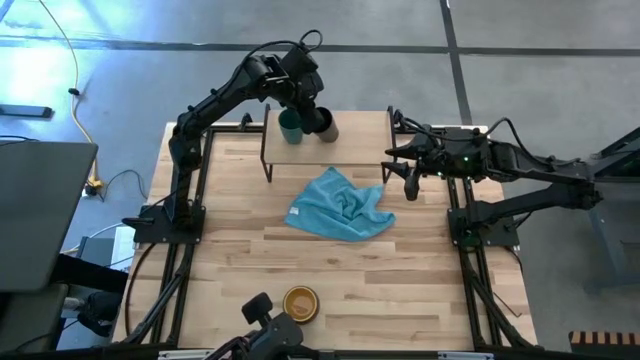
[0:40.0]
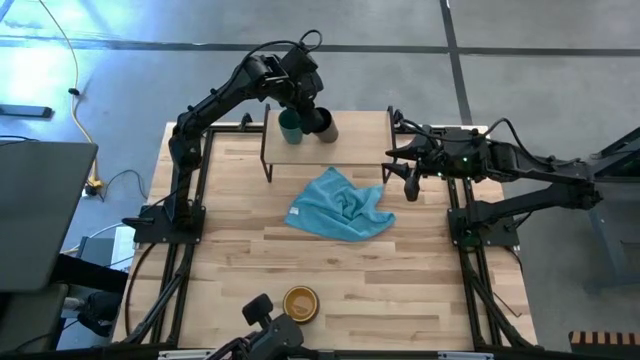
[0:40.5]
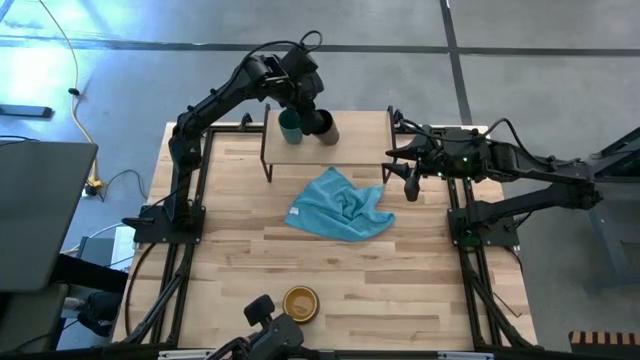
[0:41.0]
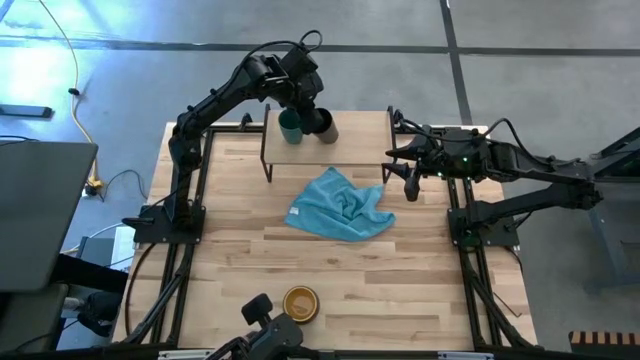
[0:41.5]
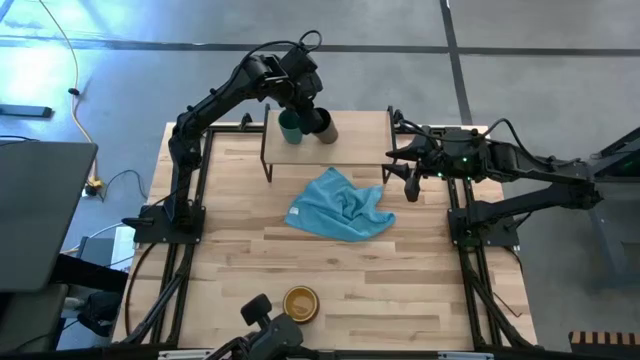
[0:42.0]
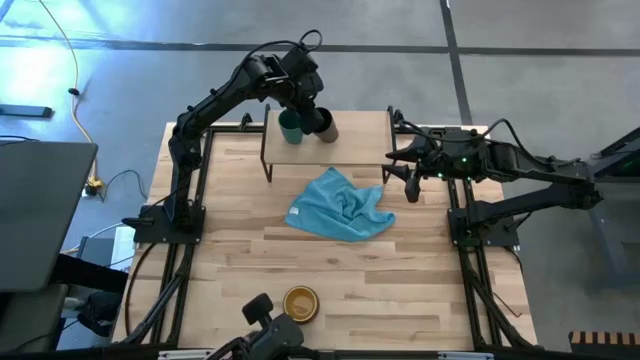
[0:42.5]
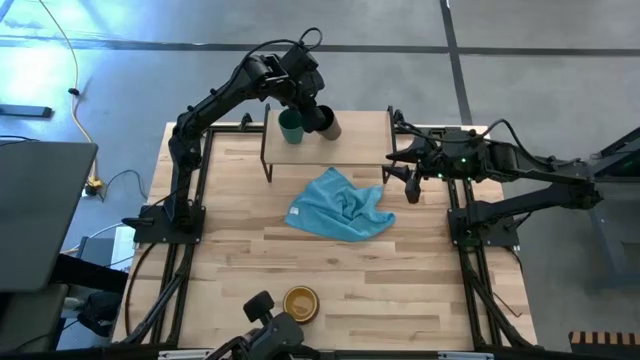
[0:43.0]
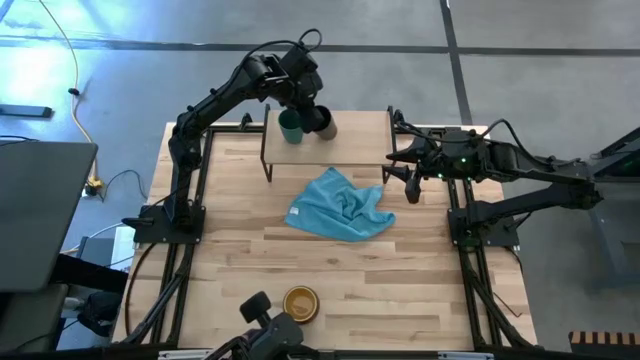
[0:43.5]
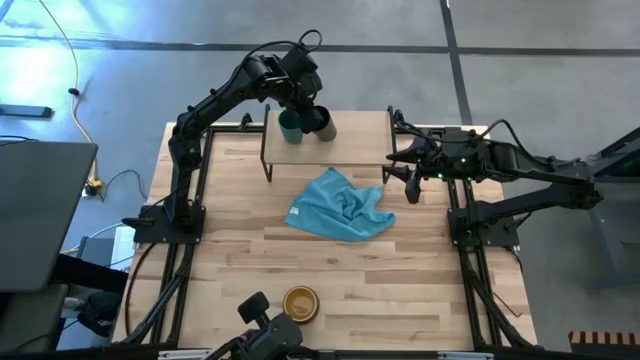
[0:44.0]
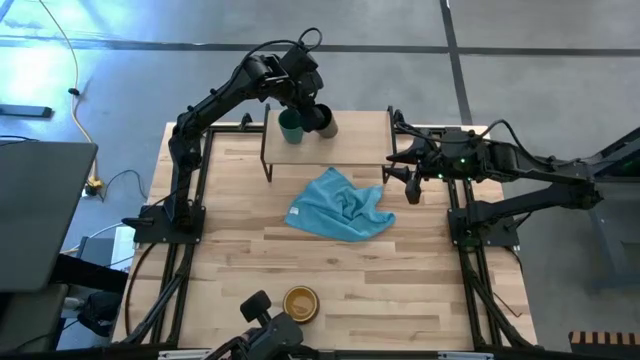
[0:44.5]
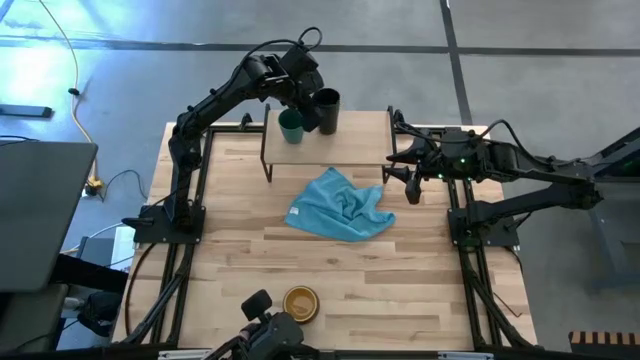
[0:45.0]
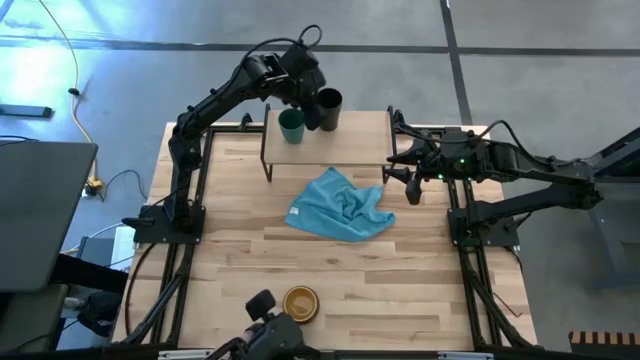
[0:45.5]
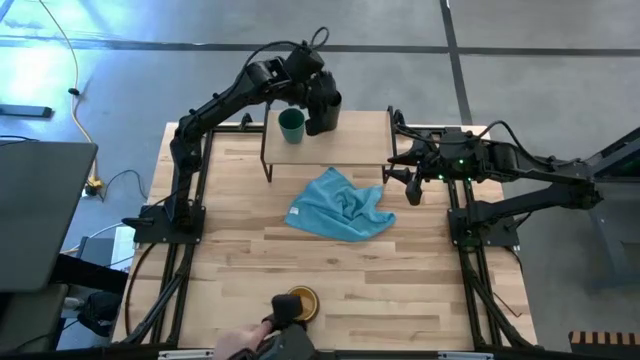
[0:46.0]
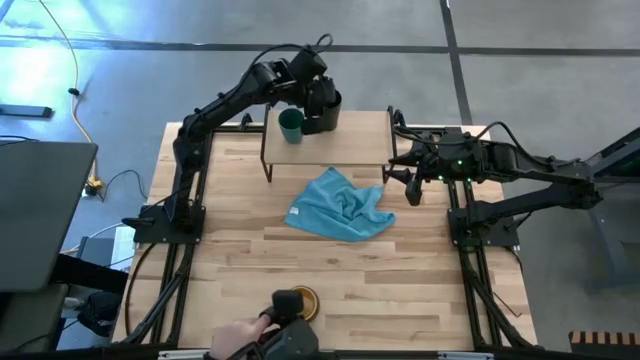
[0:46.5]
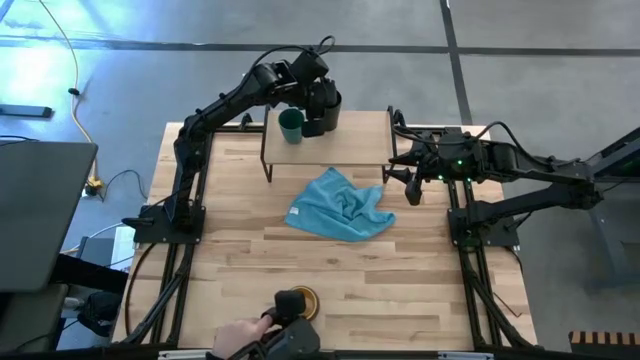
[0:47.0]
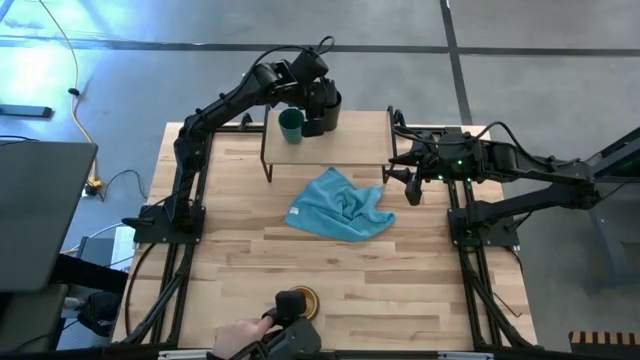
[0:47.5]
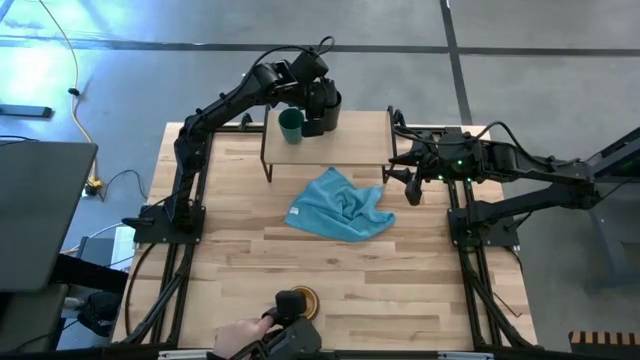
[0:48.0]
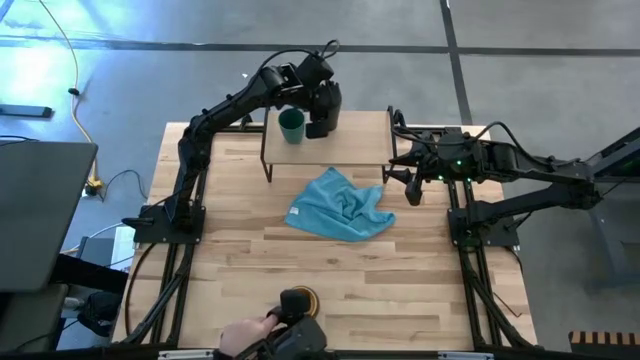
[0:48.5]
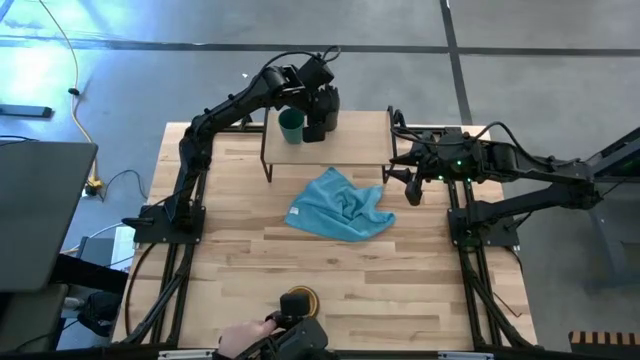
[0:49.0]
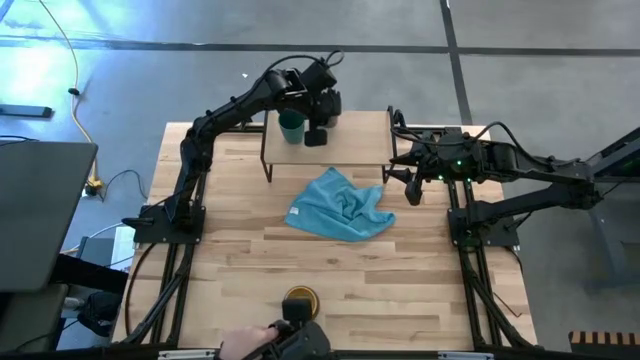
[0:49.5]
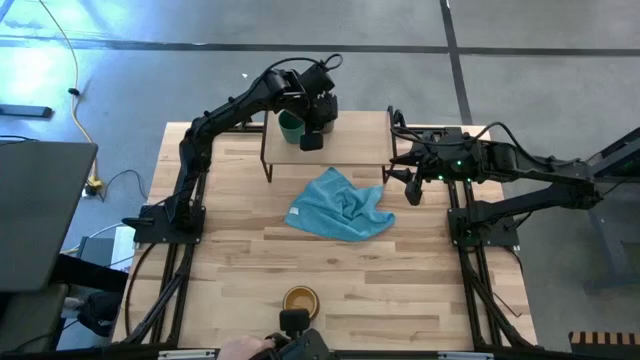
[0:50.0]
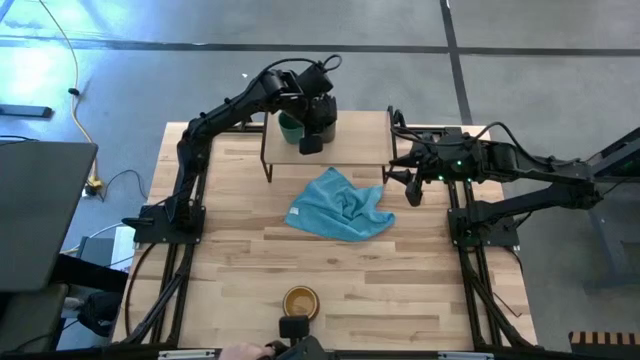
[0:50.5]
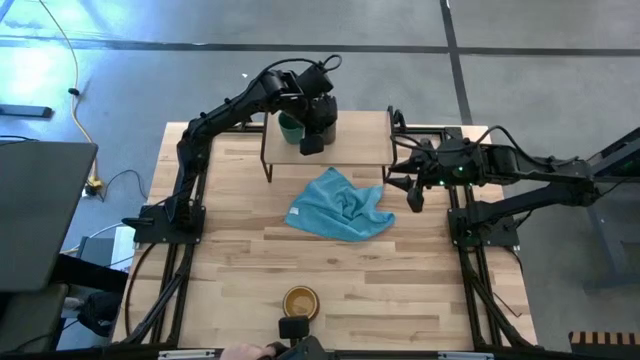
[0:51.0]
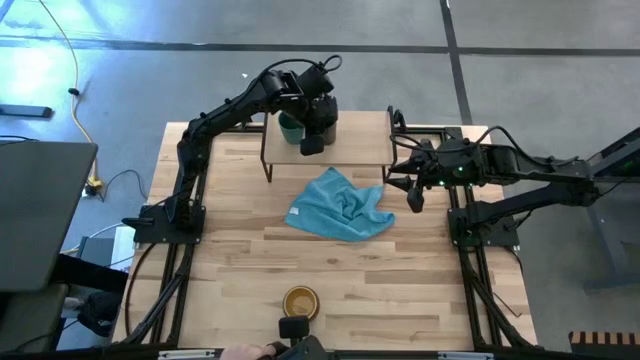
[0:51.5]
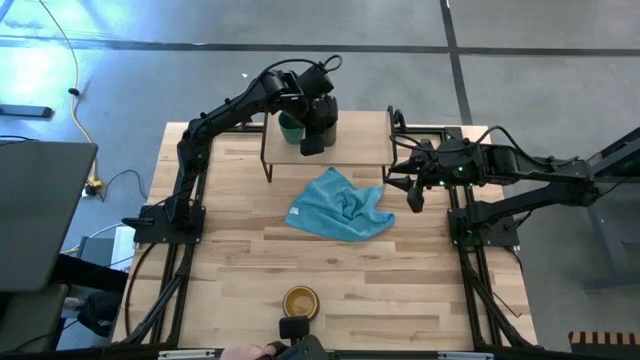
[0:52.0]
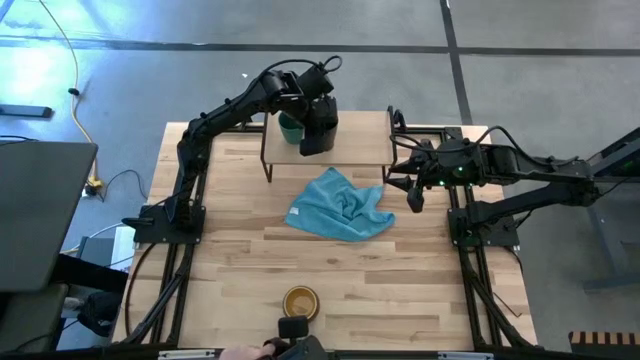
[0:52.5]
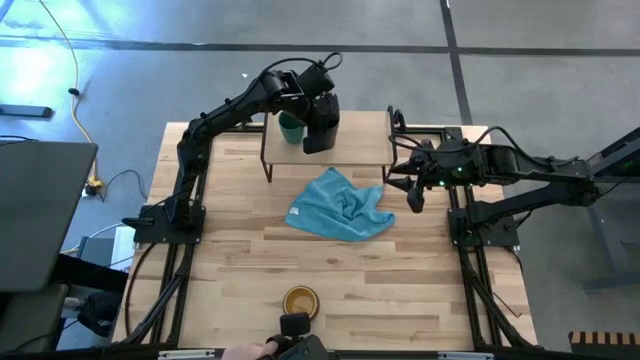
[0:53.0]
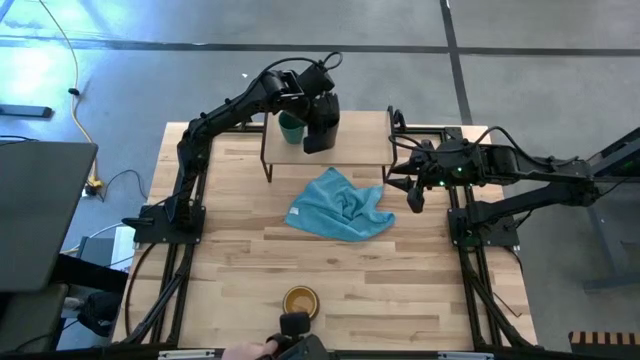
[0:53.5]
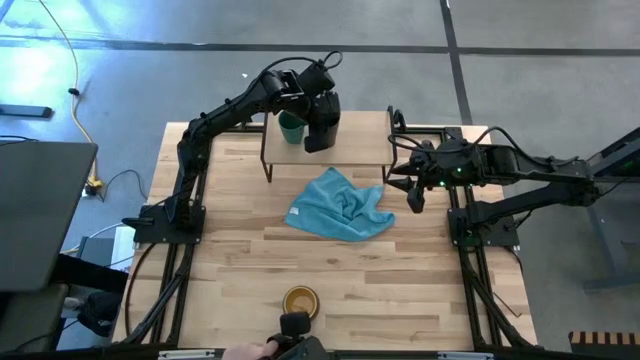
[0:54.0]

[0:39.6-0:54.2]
Task: Stack small to large cups/mugs on shelf
Put the black cup on the shelf

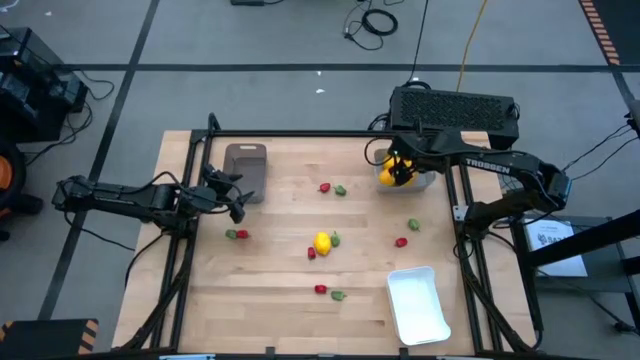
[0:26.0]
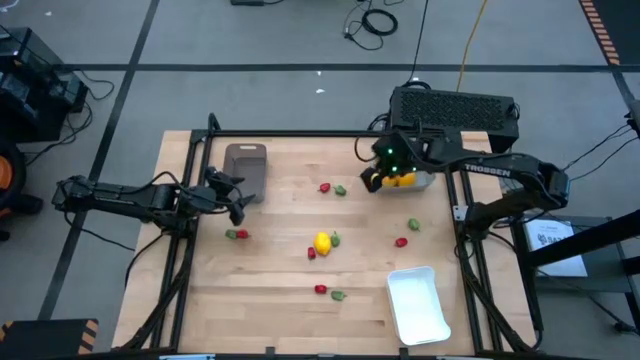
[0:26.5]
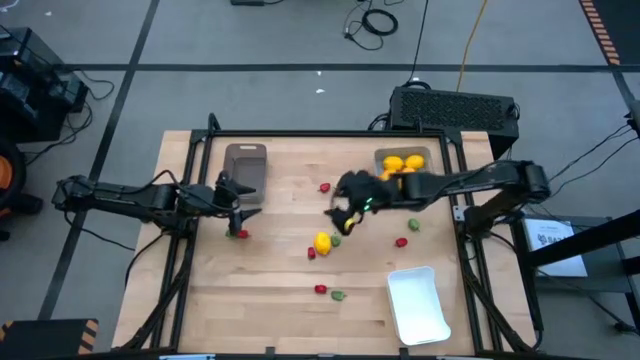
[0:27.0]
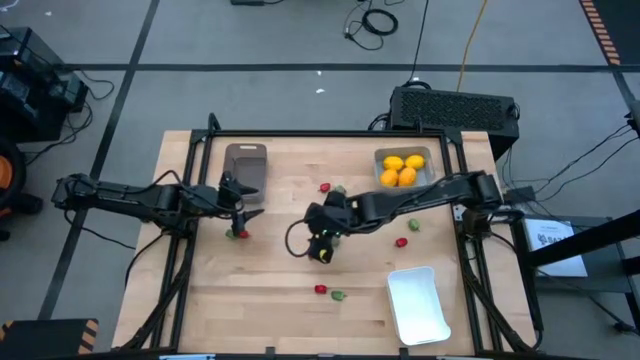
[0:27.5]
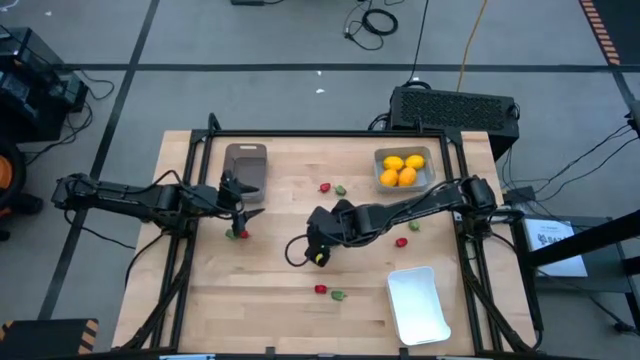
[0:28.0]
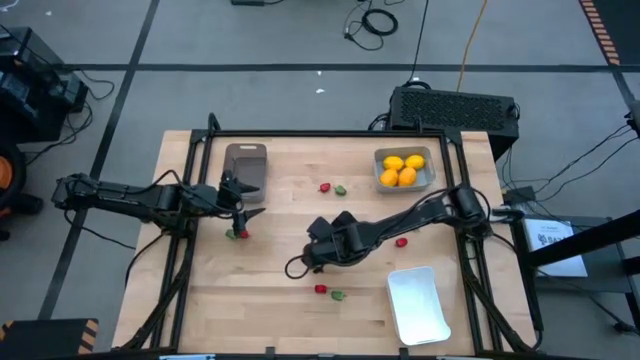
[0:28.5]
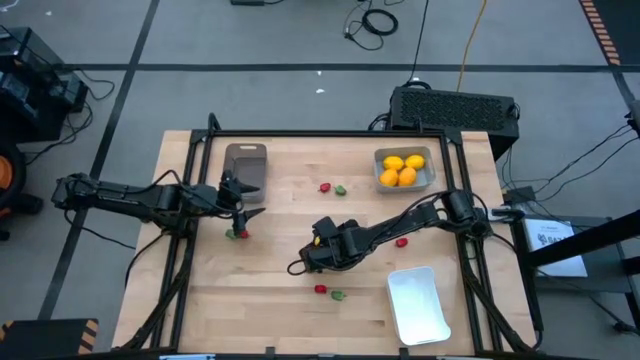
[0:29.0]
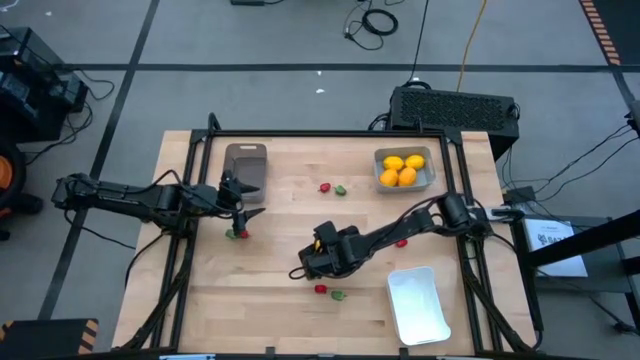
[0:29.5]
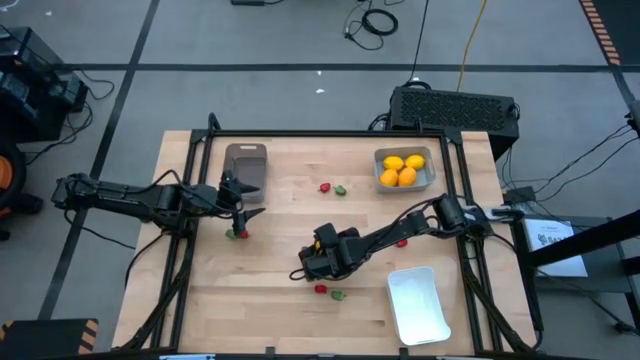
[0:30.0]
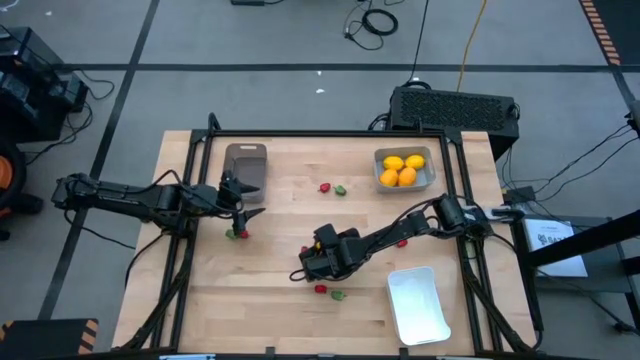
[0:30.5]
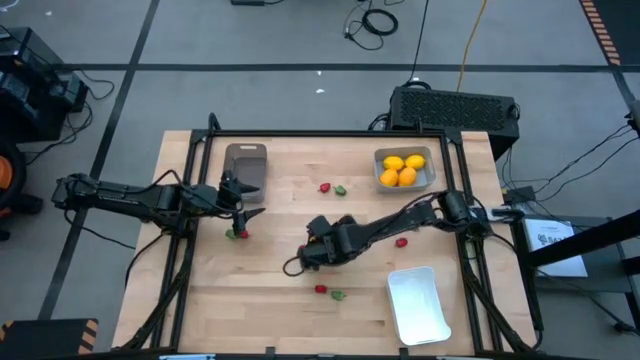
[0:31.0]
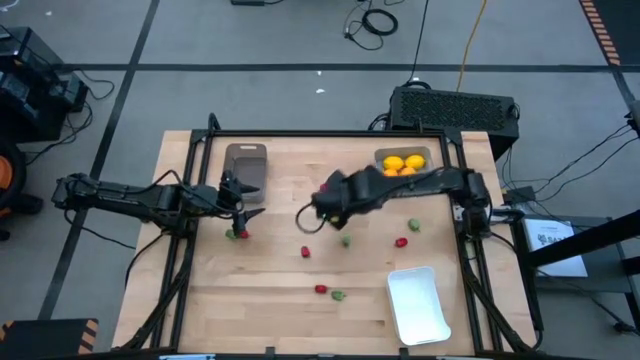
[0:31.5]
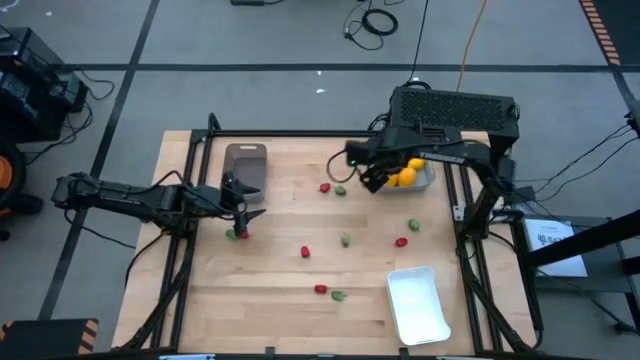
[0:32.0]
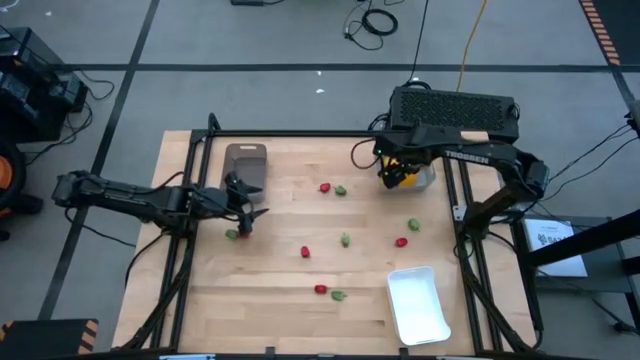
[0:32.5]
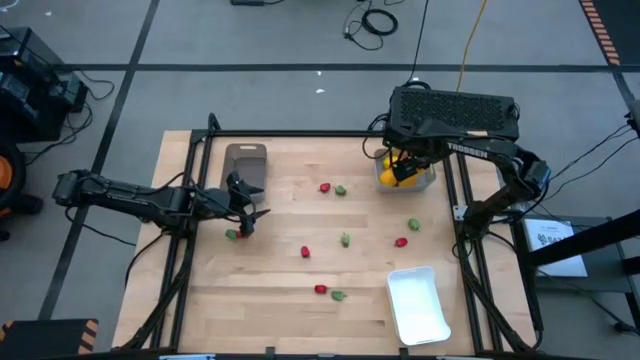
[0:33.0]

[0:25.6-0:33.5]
Task: Sort produce into baskets
Put the yellow lemon into the gray bin
